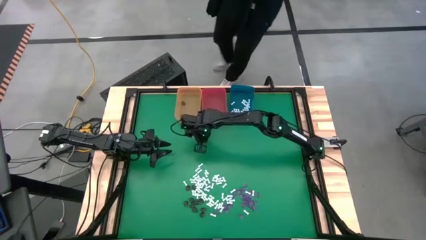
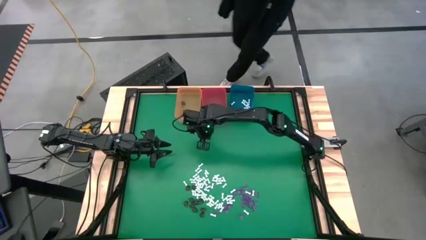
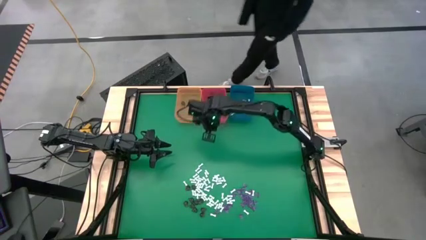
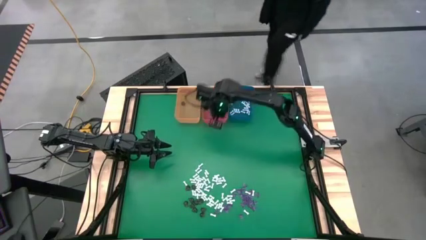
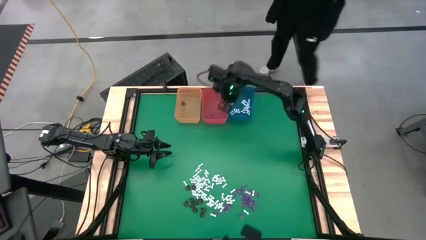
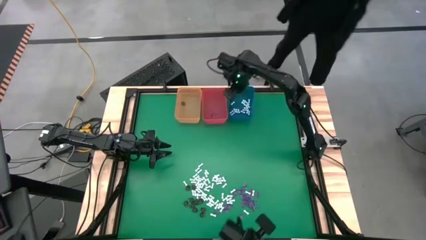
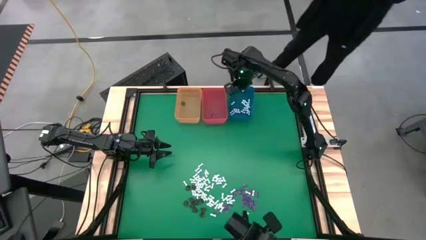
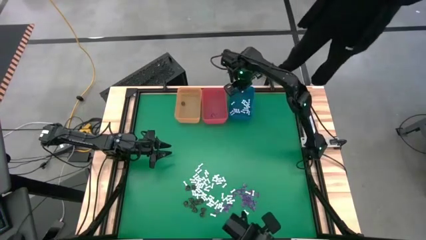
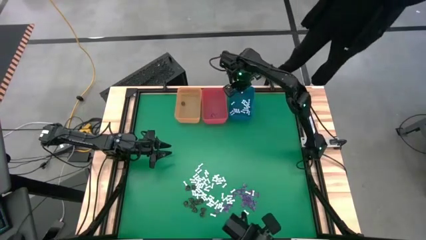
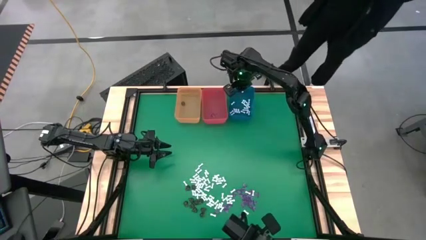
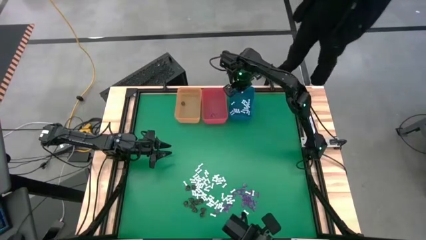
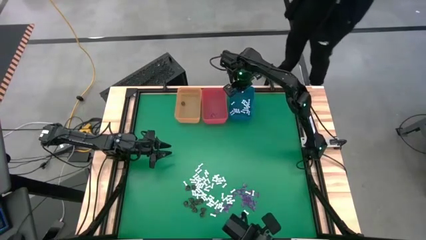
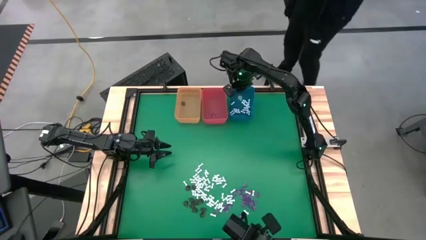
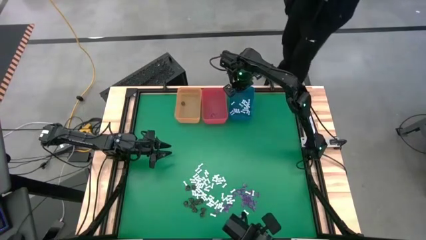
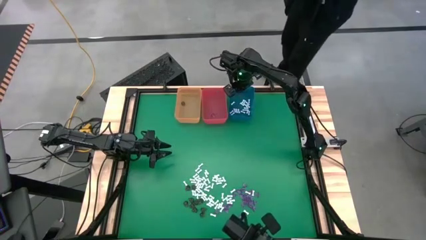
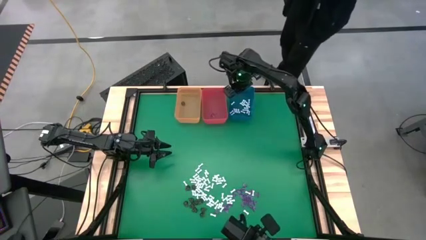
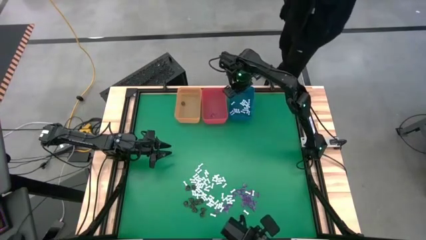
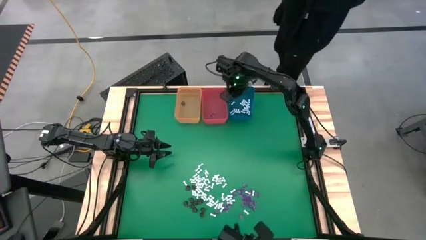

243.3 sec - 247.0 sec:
Task: Sort Halloween decoration
Put the white bone toy into the blue bin

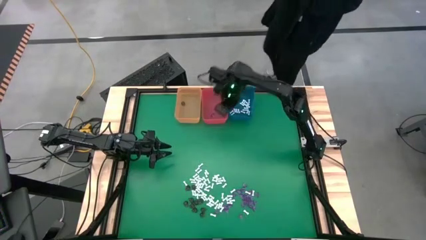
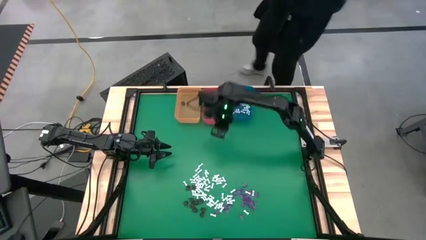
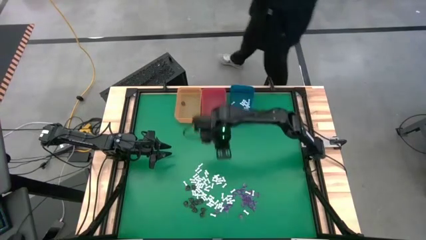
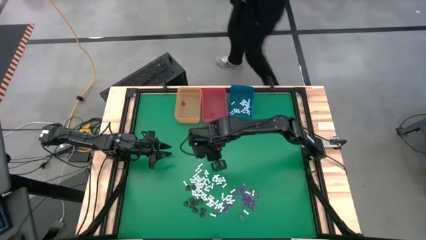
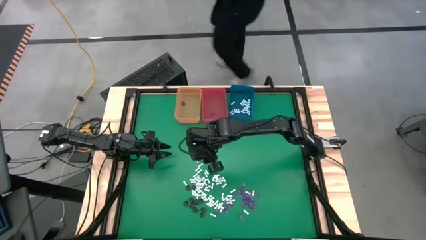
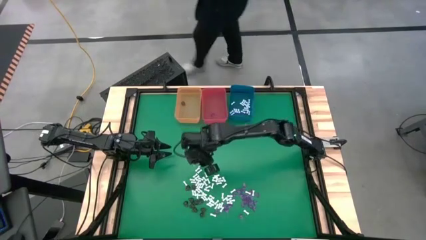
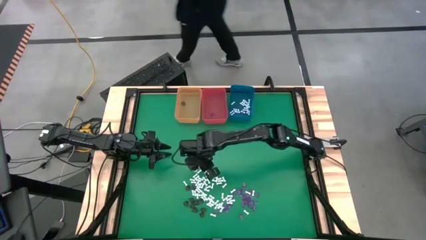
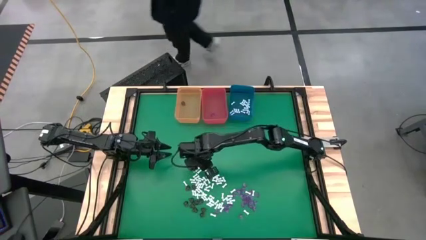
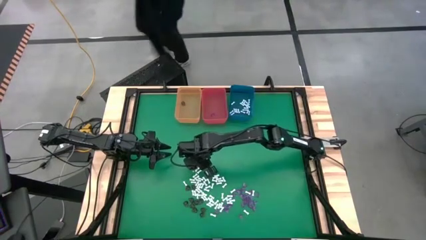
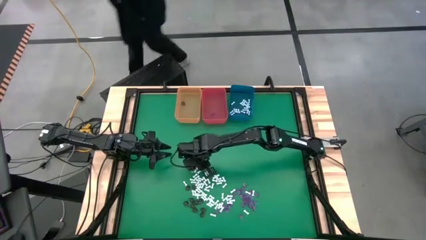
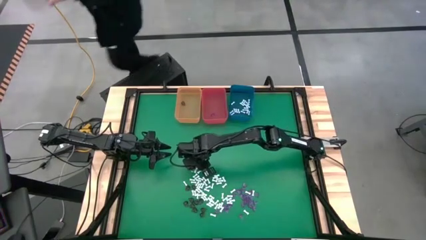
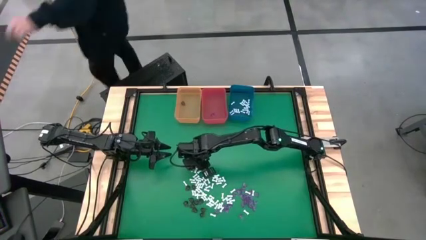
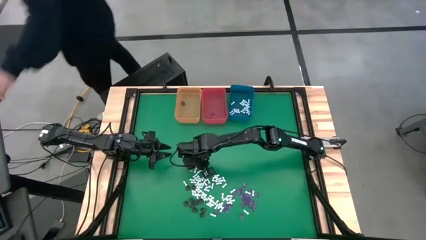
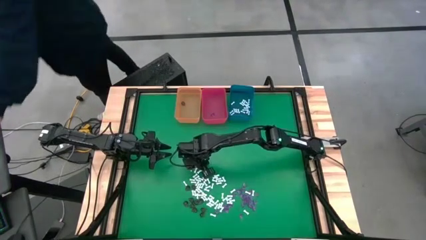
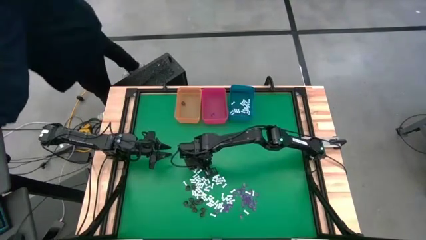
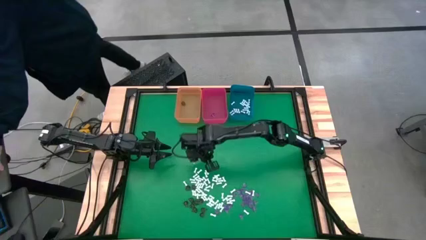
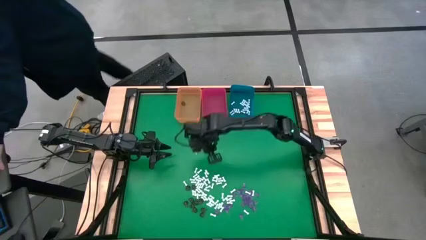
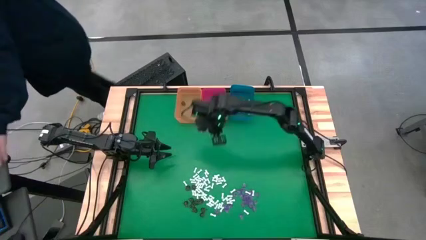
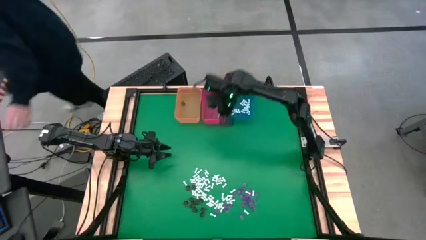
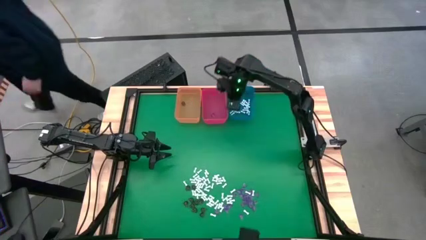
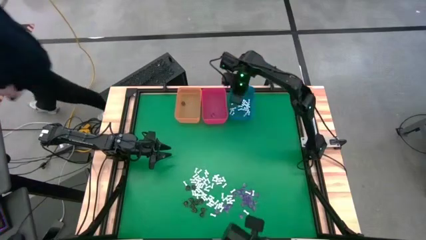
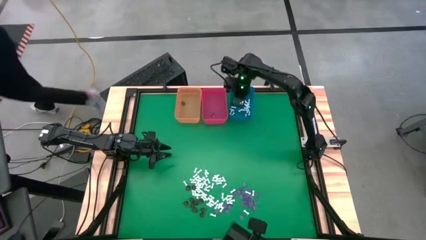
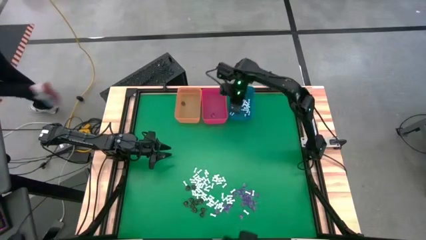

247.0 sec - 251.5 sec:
Put the white bone toy into the blue bin

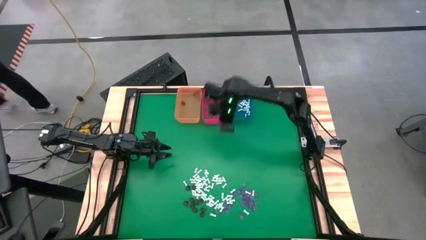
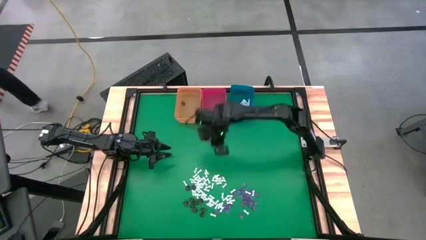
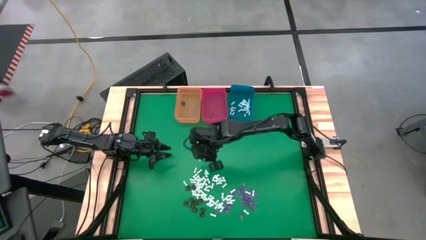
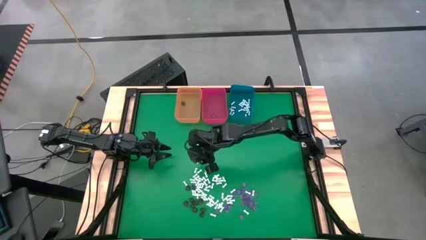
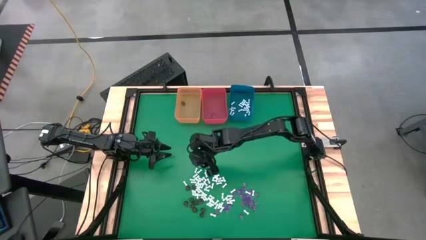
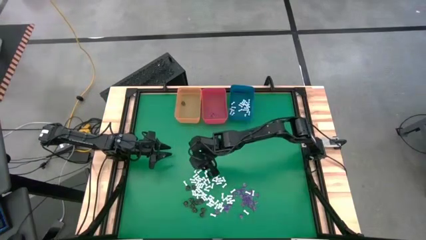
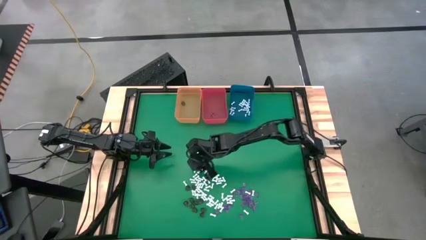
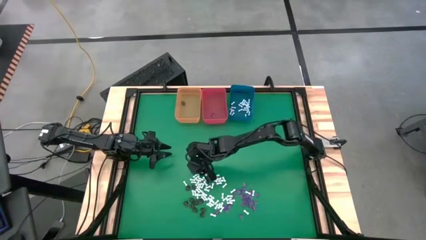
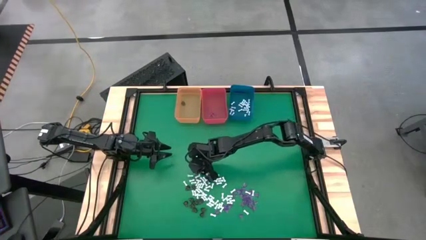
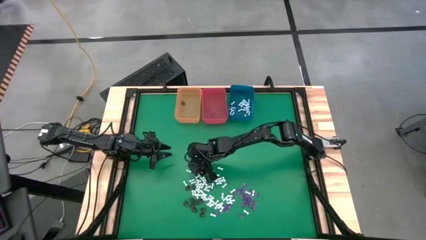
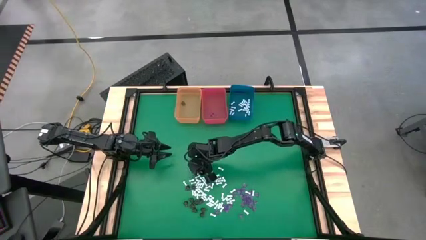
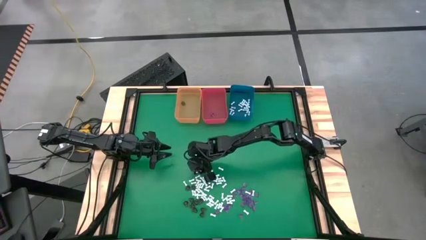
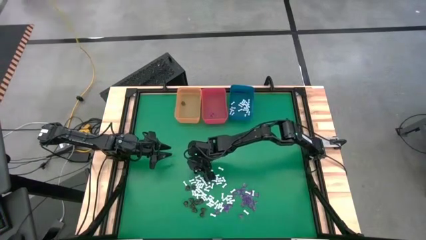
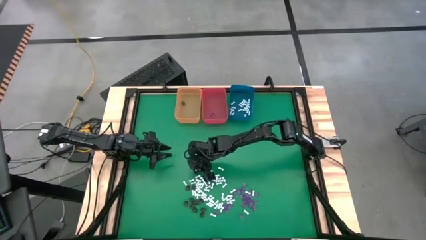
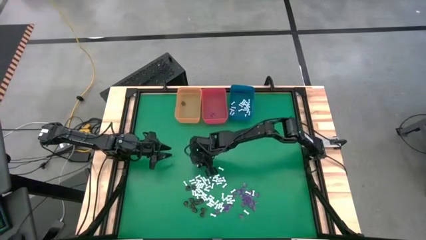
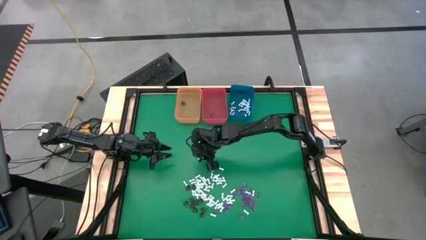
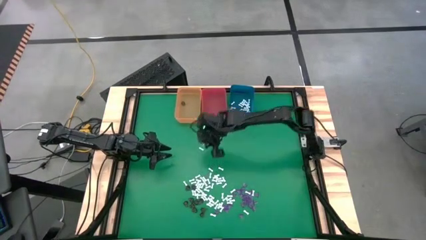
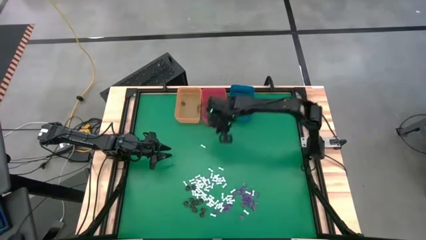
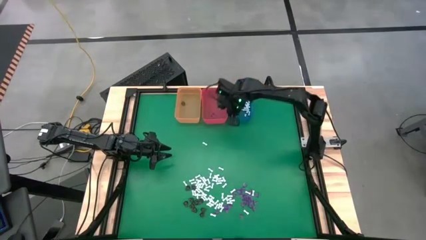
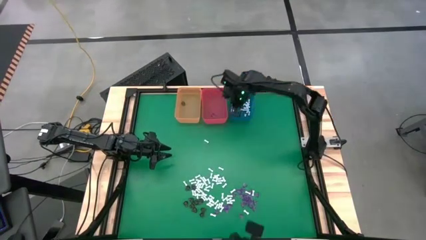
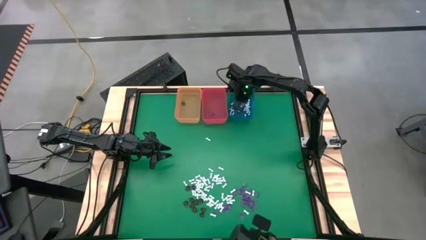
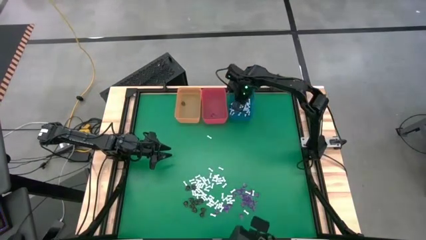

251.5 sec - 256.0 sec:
Put the white bone toy into the blue bin

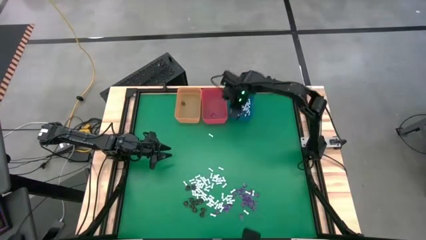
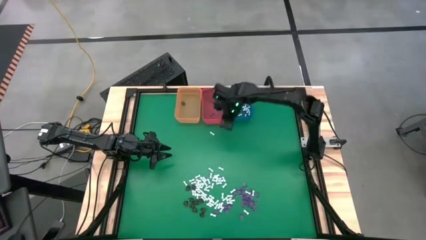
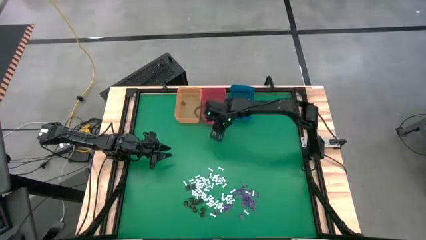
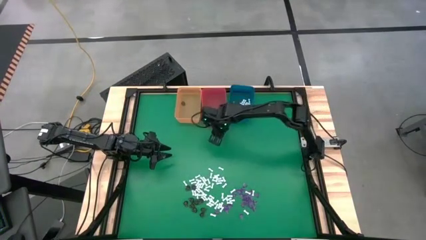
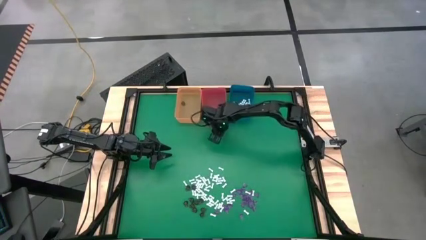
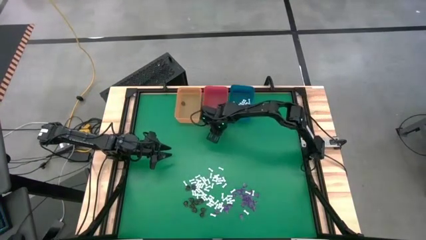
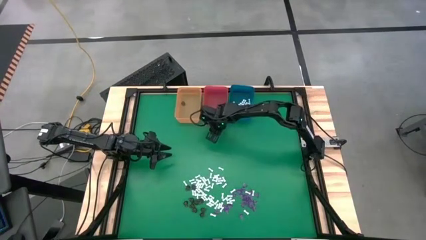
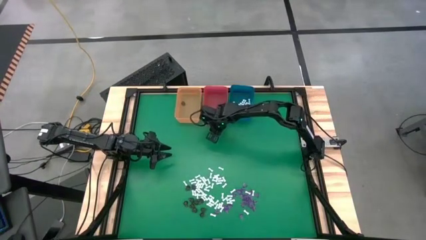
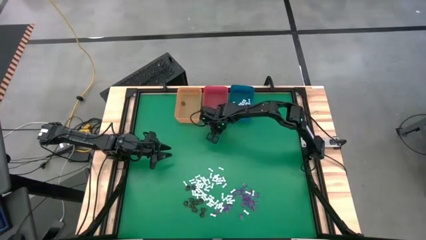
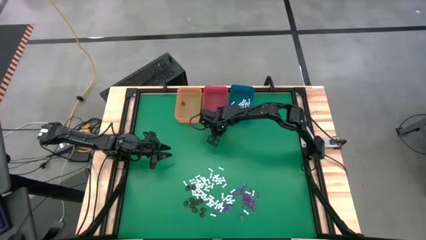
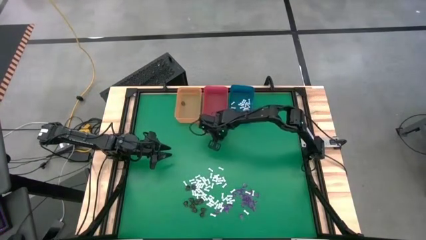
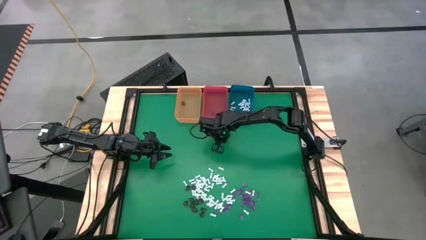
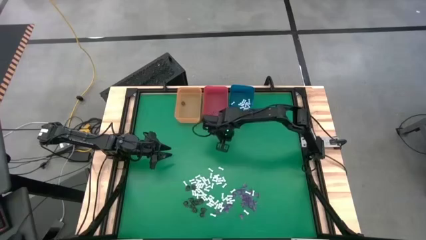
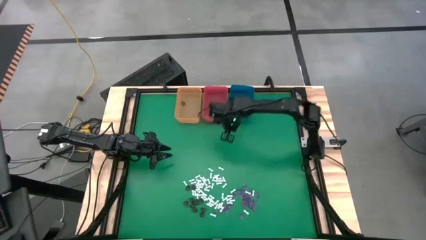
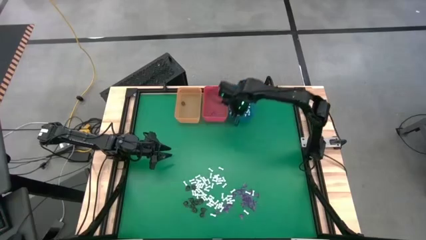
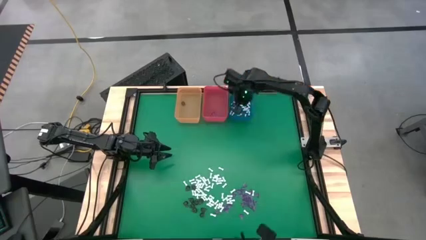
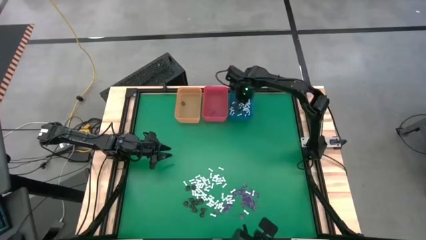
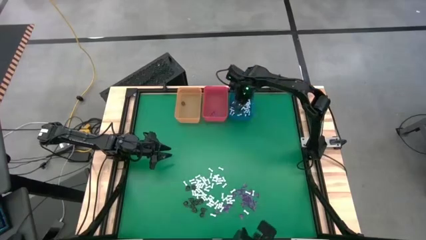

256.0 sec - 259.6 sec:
Put the white bone toy into the blue bin
